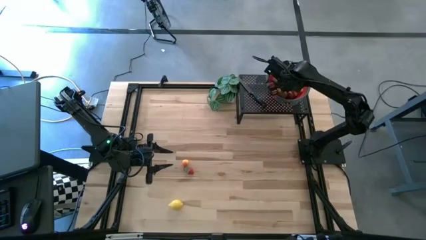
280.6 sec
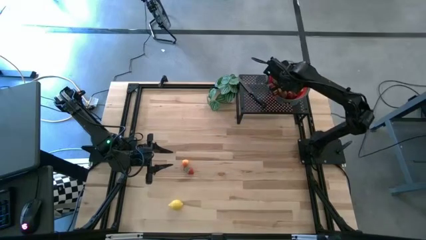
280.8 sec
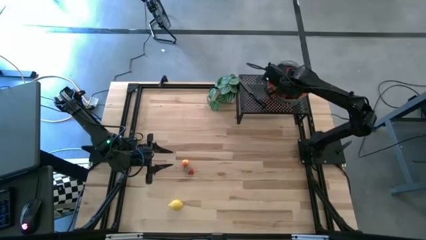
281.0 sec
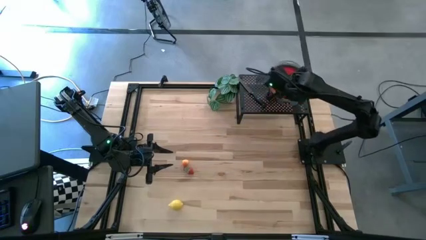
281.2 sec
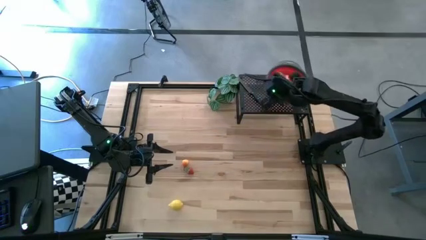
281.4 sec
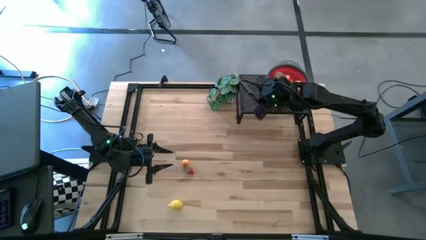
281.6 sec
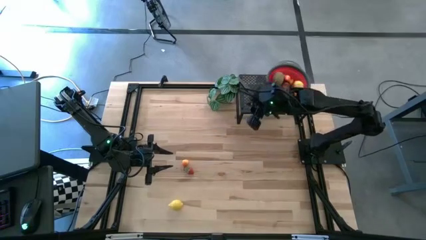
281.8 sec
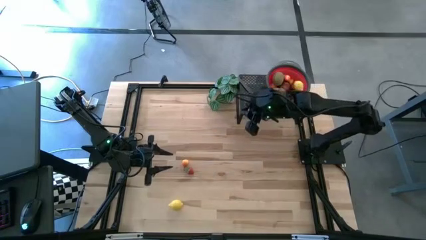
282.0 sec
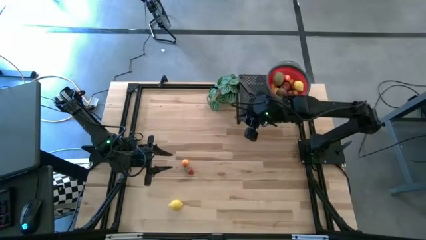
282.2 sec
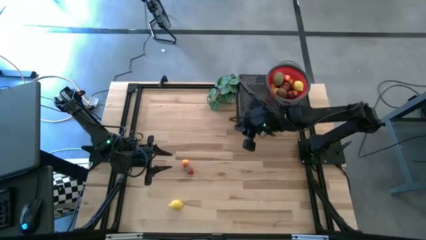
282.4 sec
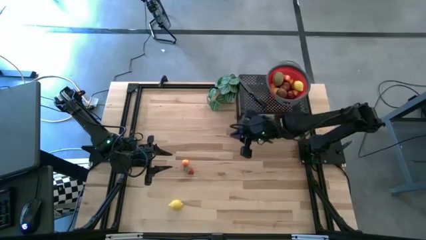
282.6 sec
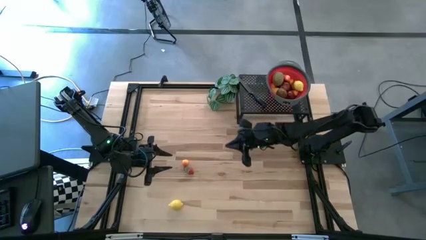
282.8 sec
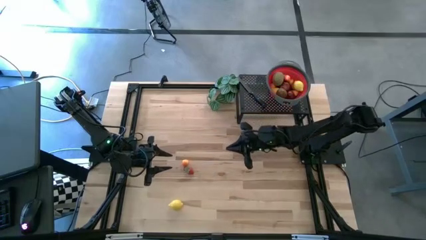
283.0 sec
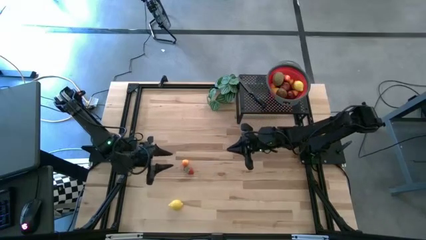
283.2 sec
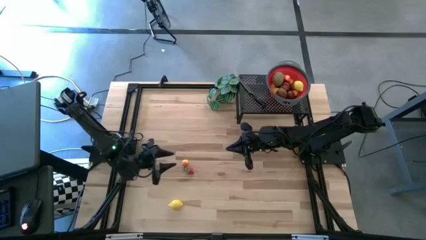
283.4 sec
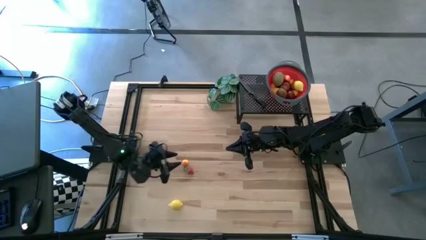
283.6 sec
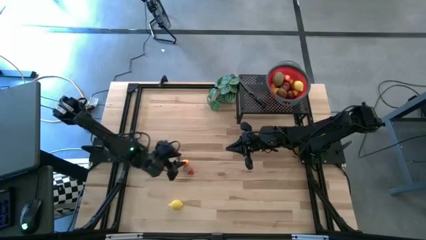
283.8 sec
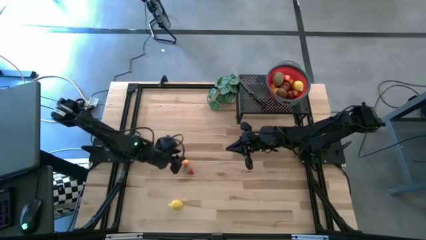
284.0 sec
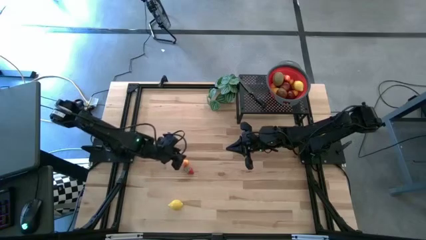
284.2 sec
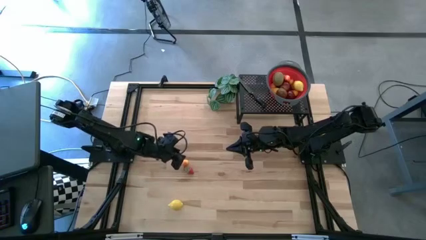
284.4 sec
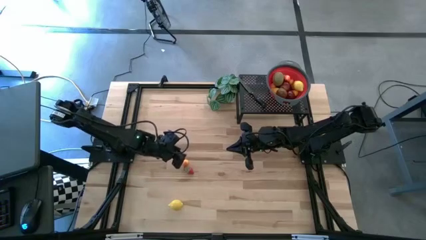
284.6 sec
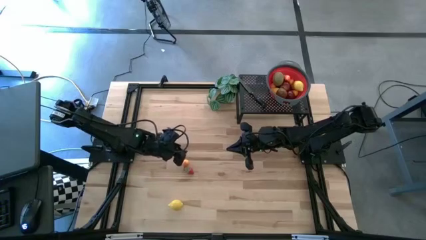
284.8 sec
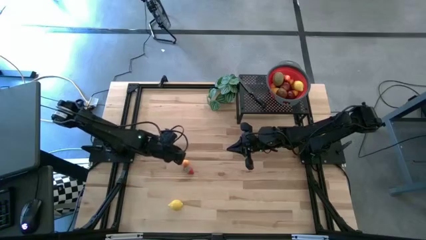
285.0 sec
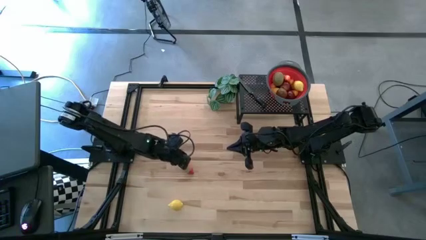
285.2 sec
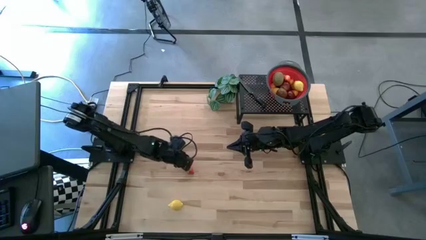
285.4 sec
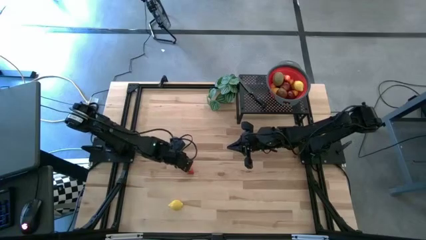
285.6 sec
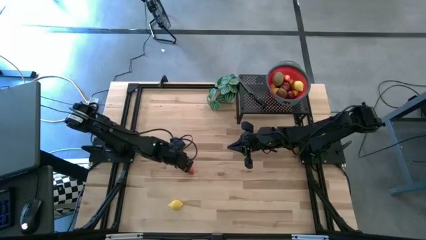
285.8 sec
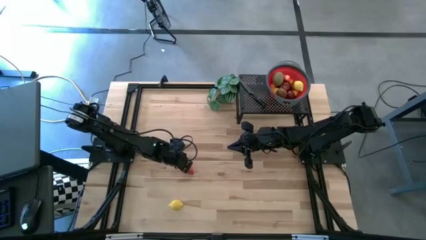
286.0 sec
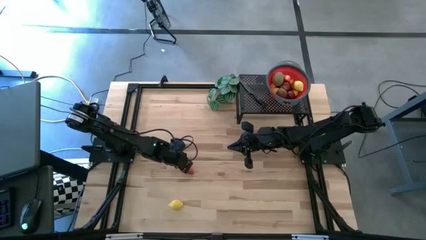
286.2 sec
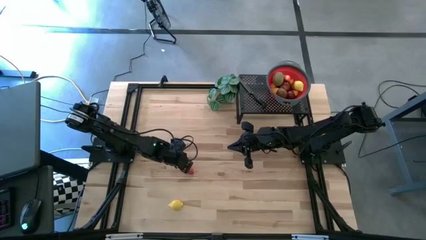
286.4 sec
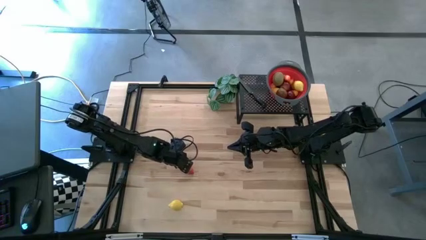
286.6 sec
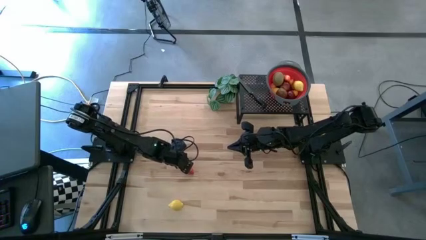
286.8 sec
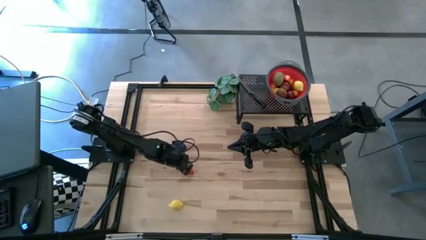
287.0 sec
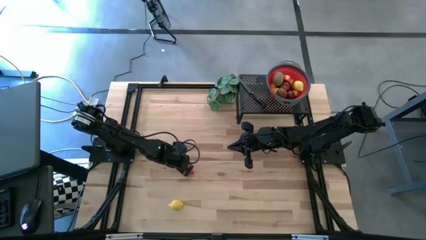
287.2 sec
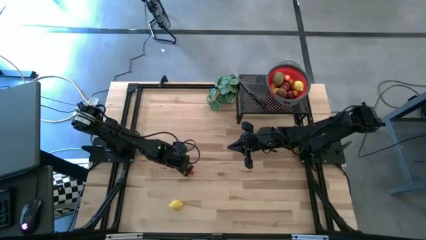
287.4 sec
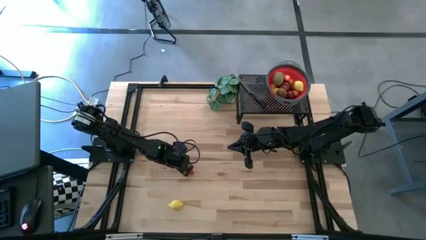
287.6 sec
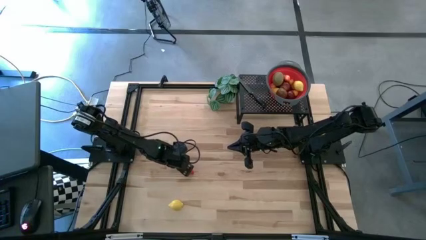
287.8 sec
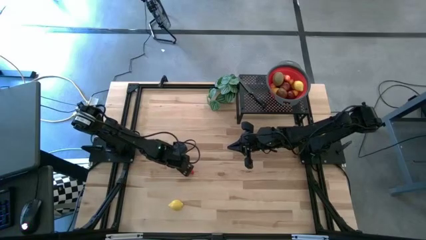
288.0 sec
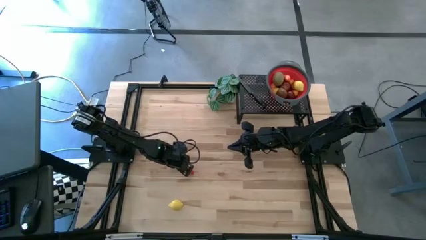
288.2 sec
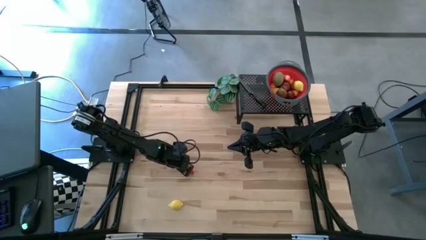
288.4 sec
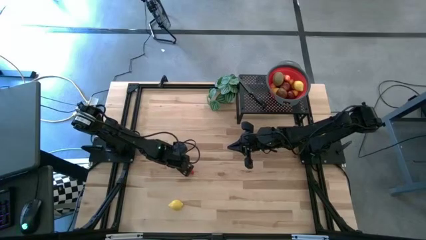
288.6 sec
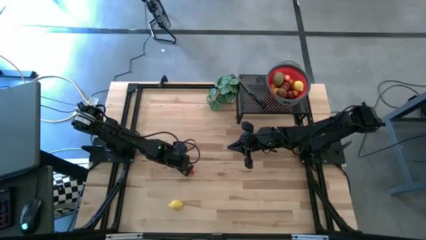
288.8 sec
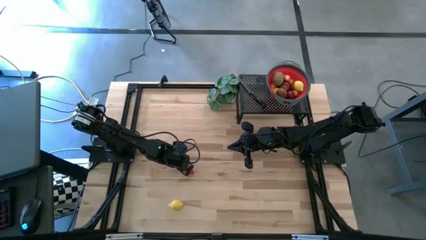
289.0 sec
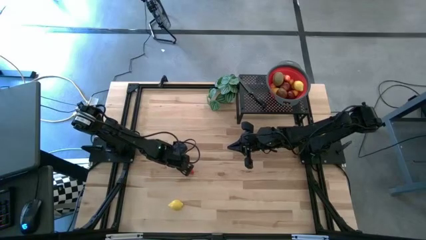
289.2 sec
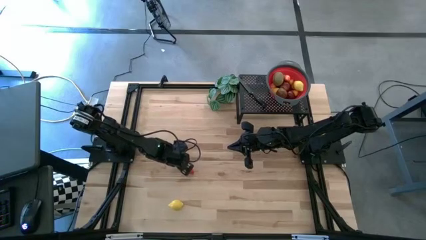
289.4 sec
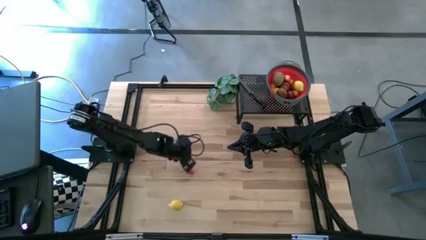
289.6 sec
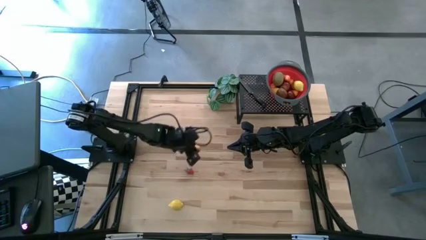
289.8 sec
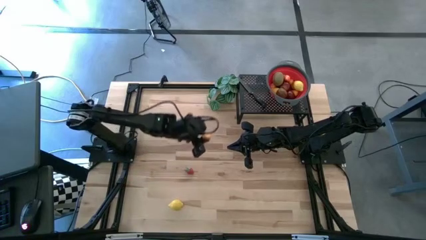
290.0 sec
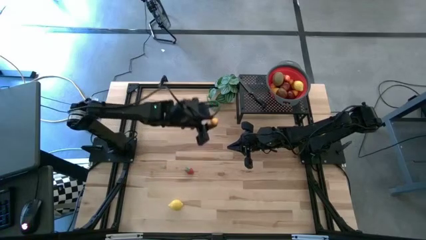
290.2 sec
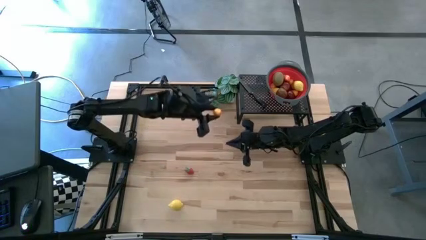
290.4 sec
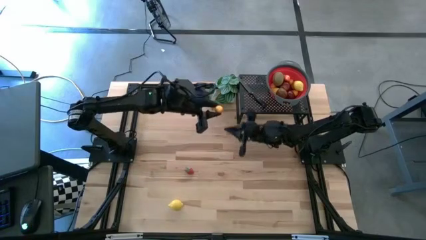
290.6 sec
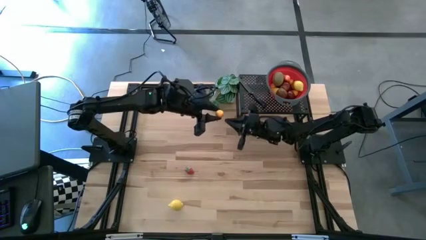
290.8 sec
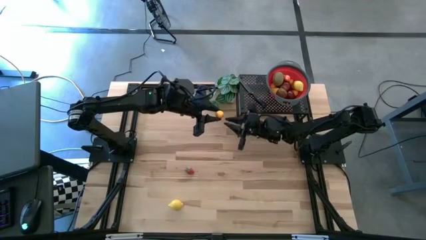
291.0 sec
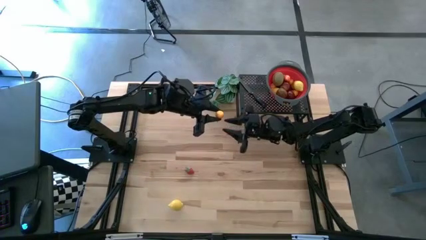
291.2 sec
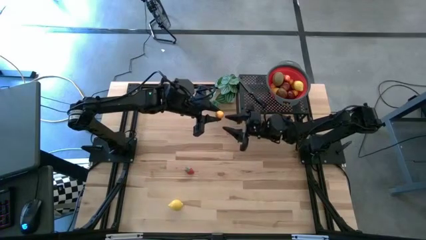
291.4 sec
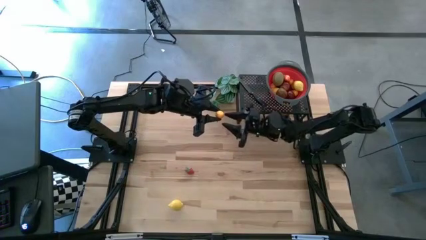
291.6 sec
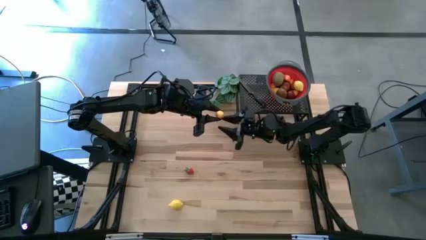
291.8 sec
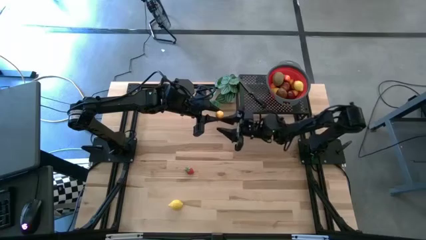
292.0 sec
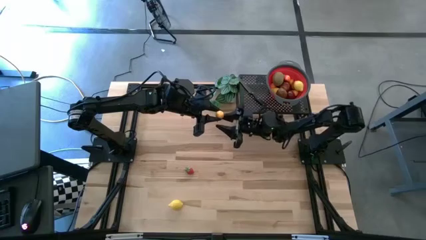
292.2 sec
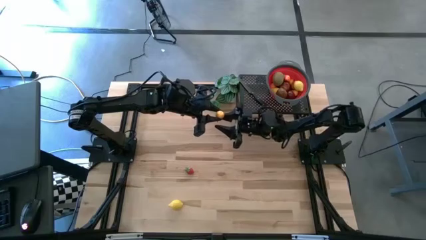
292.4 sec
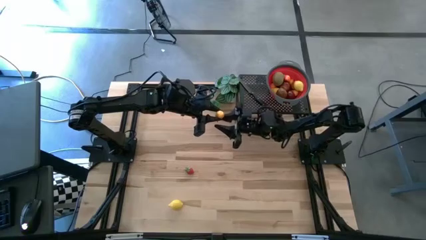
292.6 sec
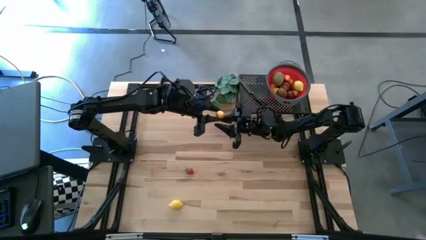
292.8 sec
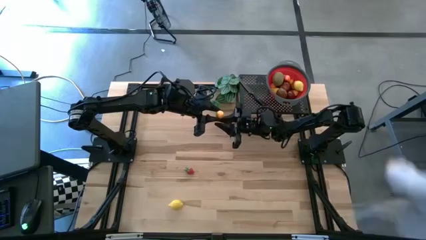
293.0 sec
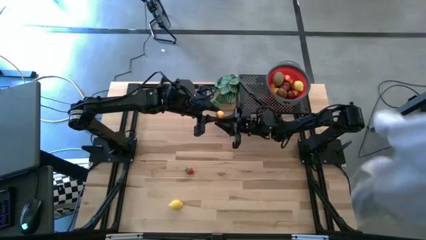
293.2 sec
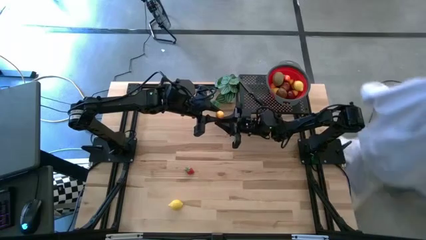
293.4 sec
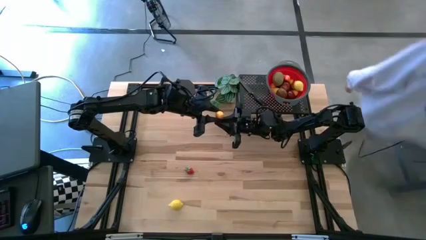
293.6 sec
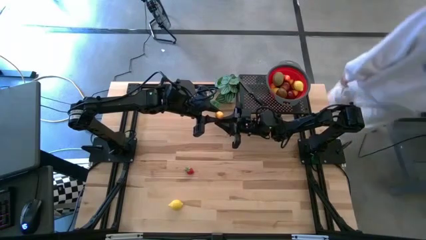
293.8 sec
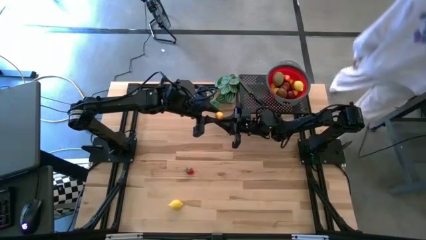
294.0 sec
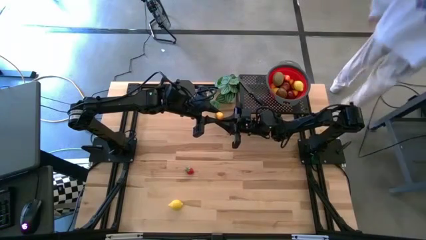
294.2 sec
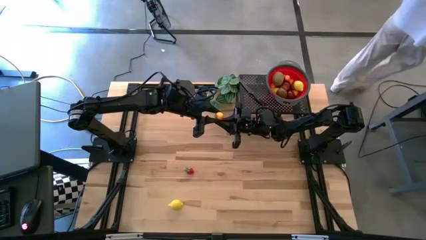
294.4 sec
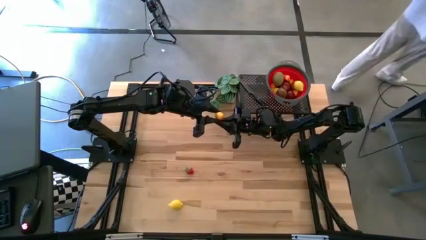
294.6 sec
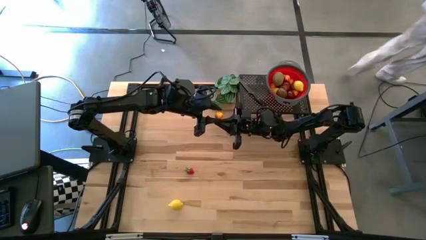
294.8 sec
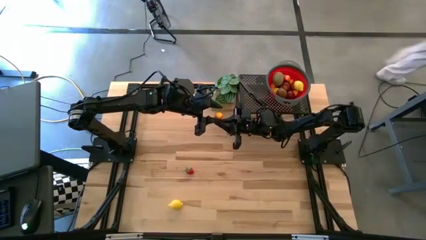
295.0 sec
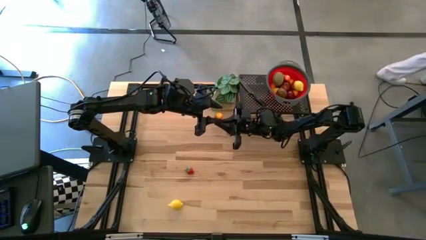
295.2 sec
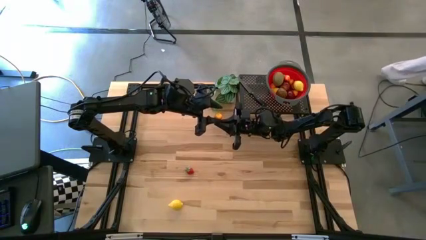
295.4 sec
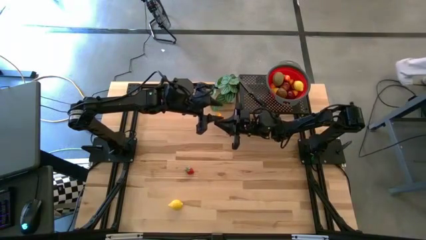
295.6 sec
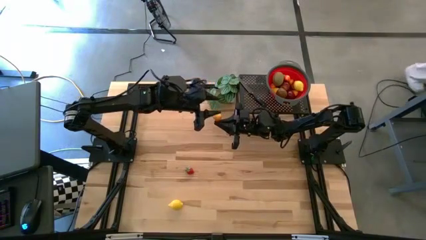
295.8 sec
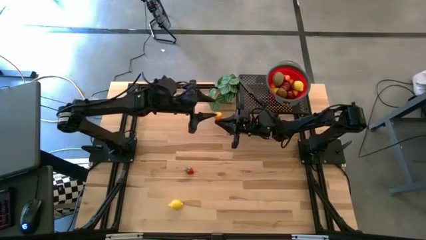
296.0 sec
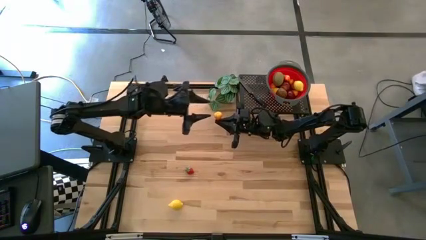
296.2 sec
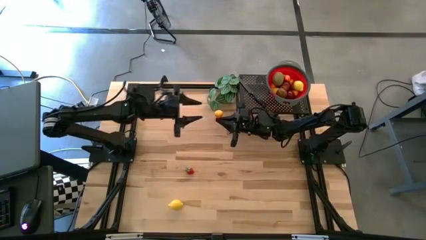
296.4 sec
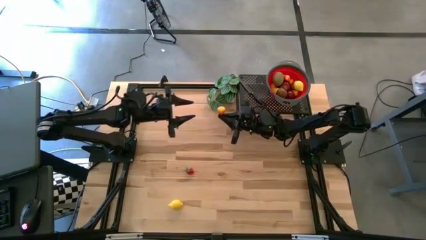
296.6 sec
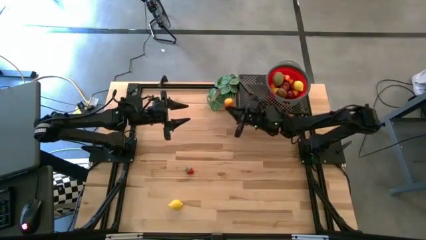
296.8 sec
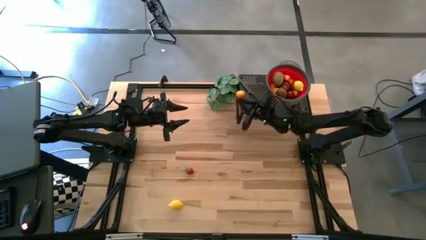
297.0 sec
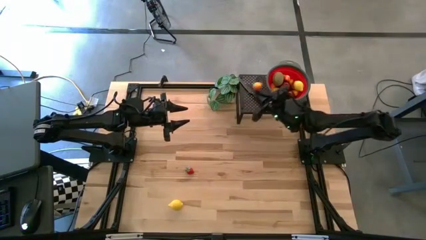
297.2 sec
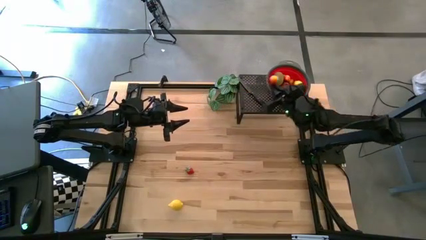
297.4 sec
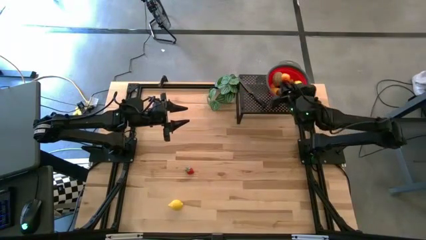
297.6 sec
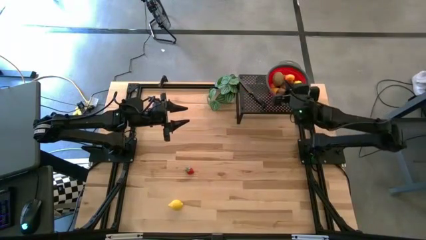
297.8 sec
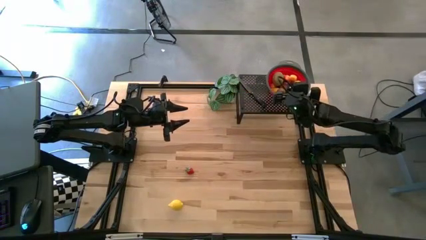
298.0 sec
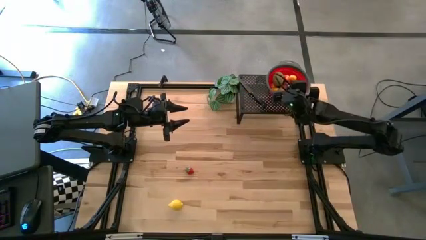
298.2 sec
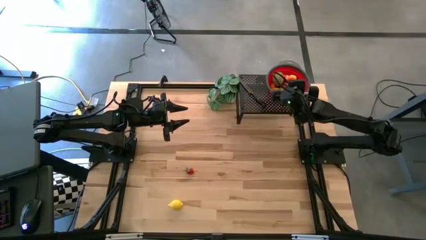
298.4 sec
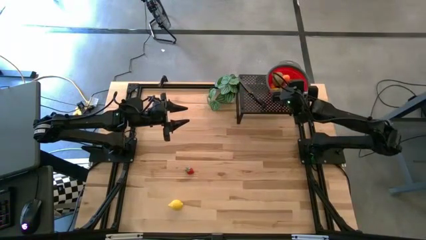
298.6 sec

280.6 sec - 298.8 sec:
Task: Pick & Place Fruit
Put the orange pear into the red strainer bowl
